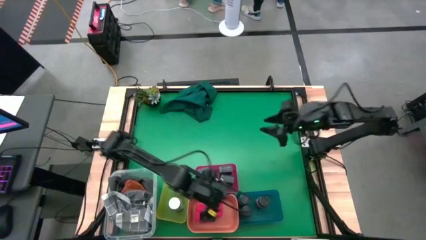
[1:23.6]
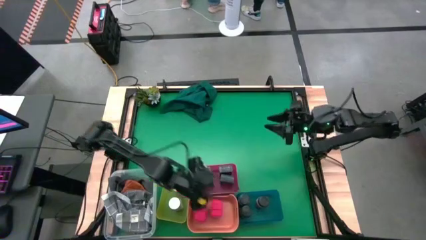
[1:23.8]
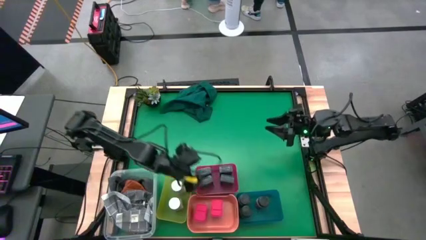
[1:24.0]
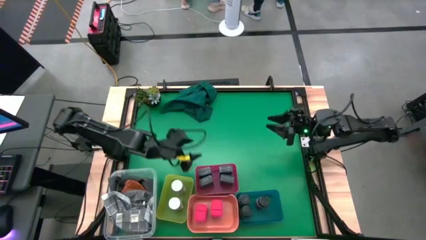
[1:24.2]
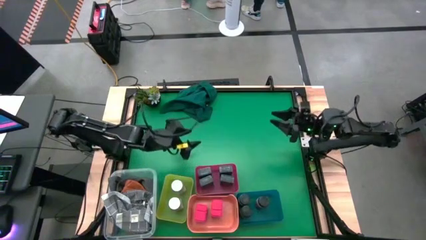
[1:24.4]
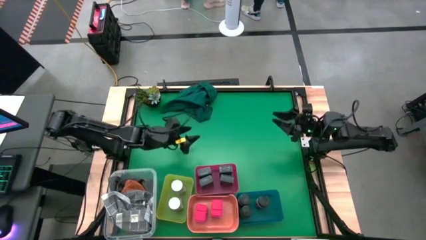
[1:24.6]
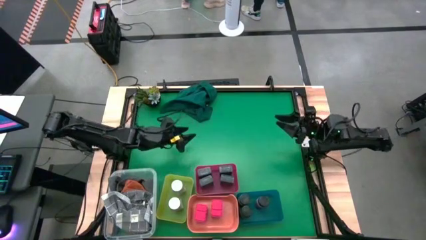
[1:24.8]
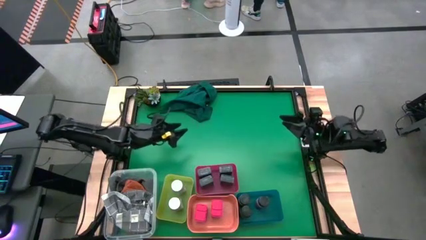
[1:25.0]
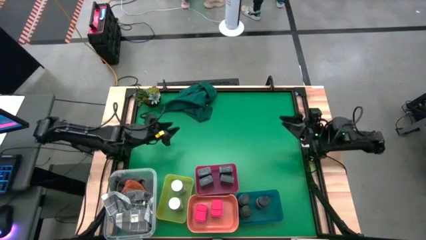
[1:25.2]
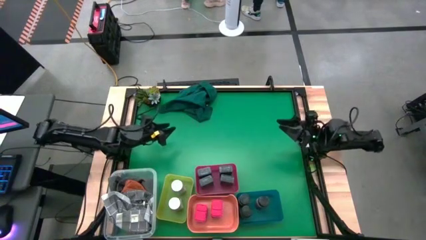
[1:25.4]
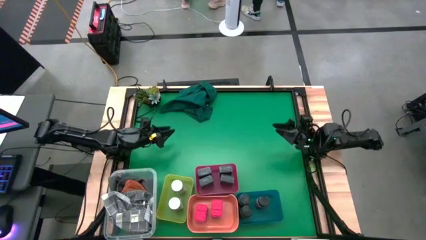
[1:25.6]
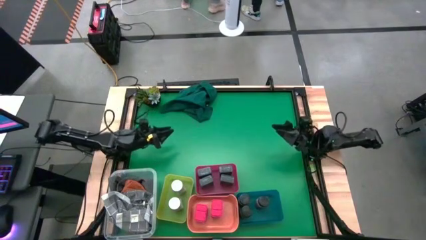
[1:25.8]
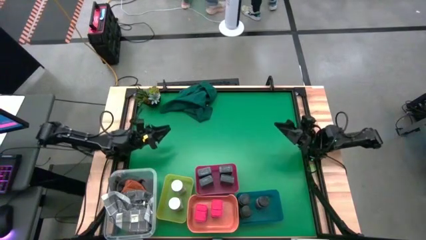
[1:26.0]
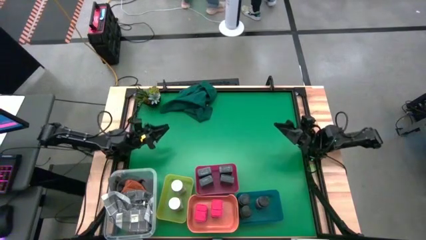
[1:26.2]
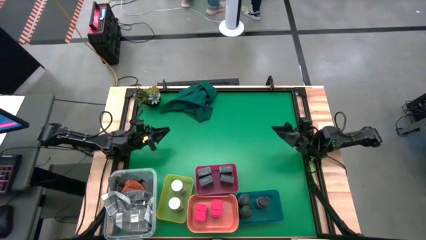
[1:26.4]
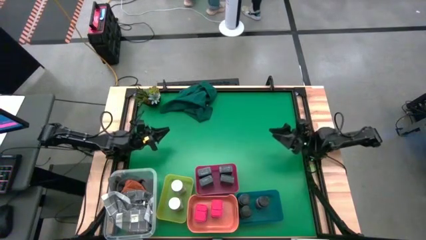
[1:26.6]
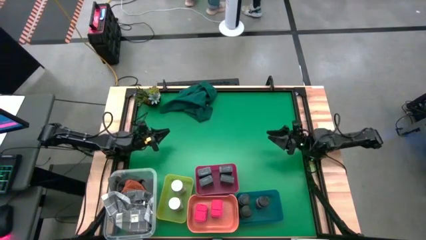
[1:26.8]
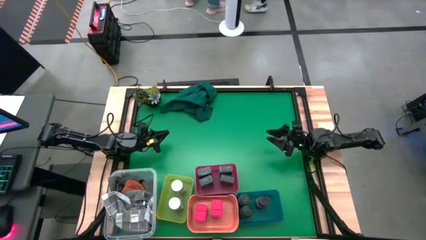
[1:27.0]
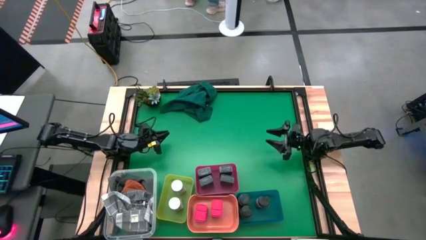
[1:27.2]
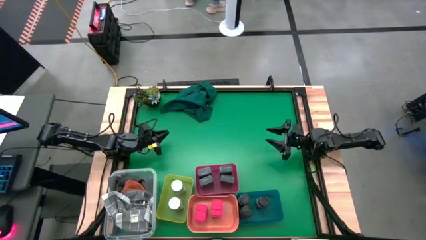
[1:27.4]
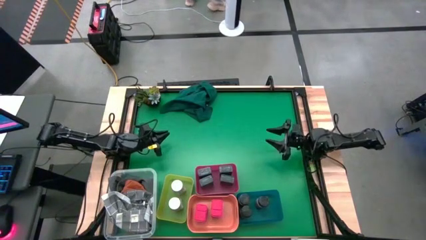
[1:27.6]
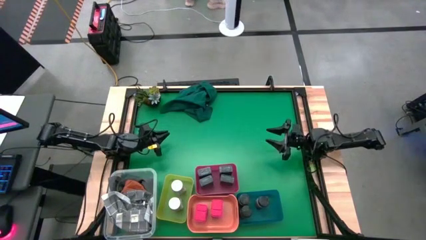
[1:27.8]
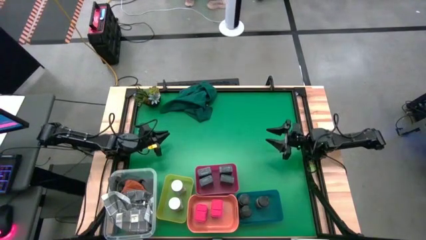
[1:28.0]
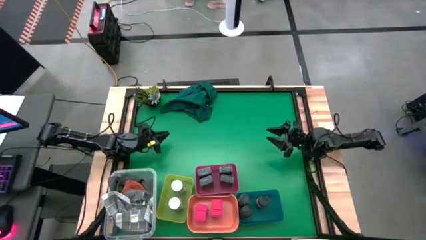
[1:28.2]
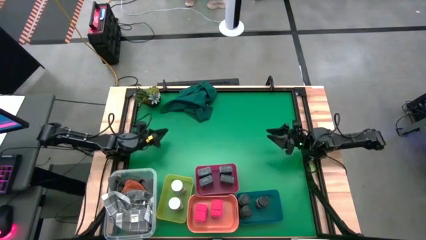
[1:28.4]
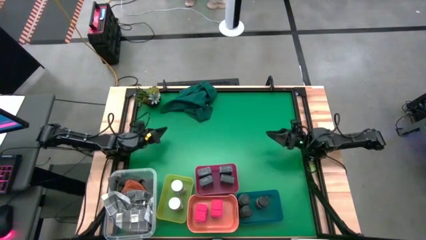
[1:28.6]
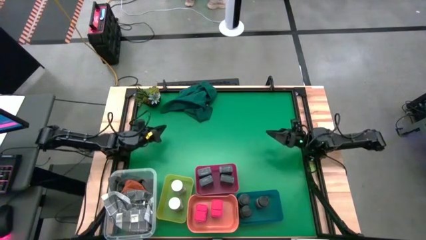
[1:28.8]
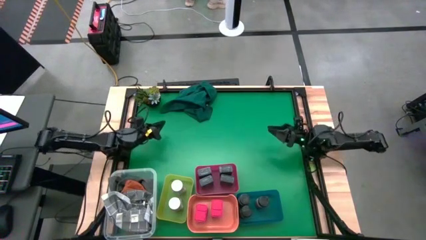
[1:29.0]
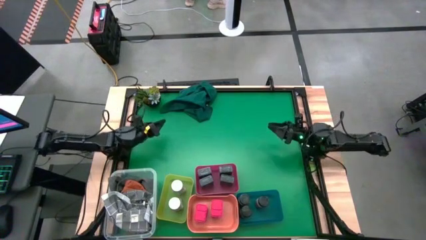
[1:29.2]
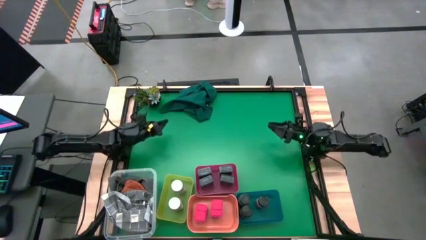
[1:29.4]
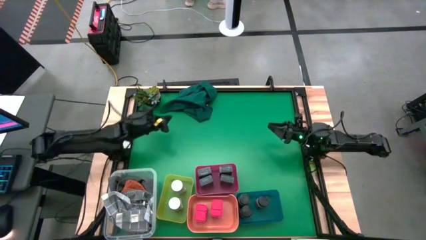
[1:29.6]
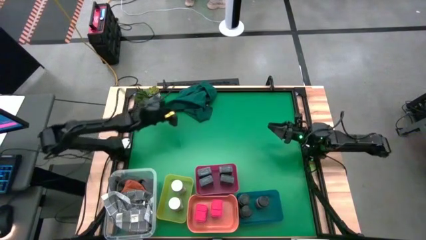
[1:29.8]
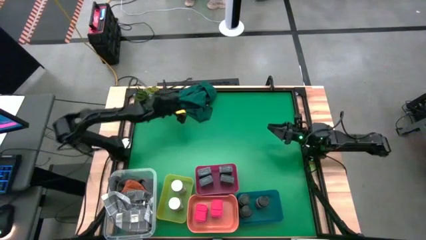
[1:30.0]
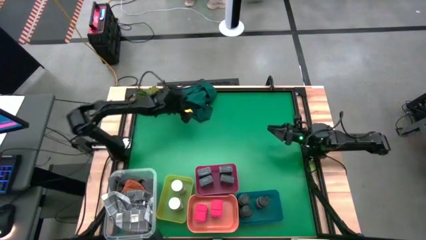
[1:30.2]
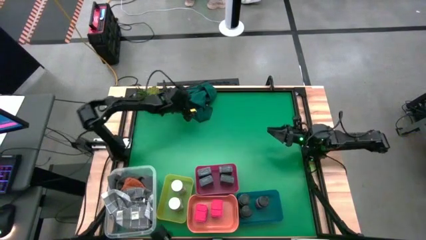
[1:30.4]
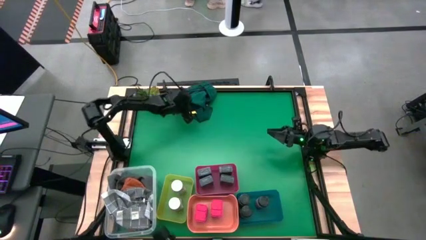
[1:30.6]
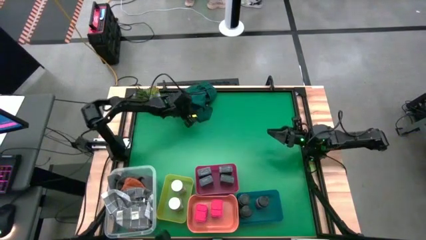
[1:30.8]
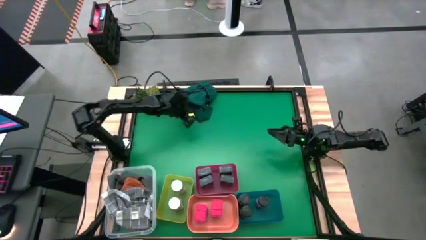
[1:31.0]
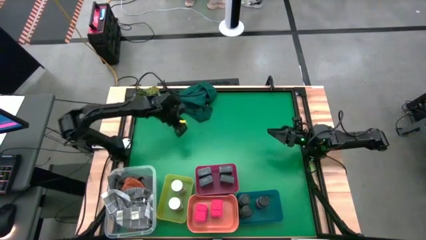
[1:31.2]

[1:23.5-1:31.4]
Task: Sort spices by type
Move the green microfiber cloth to the left of the table

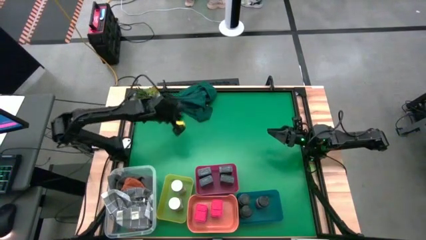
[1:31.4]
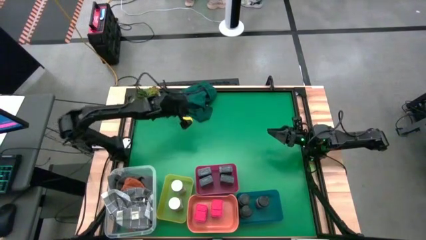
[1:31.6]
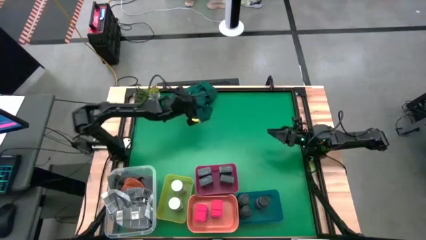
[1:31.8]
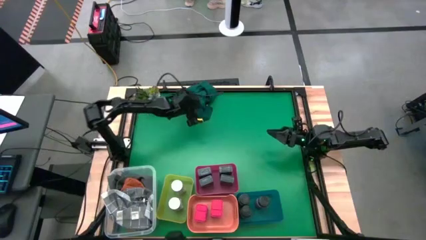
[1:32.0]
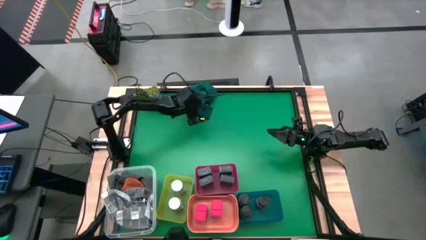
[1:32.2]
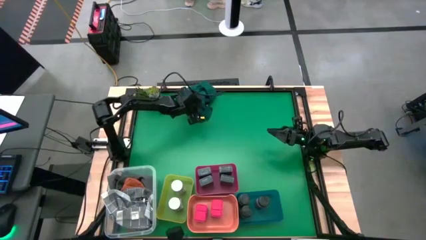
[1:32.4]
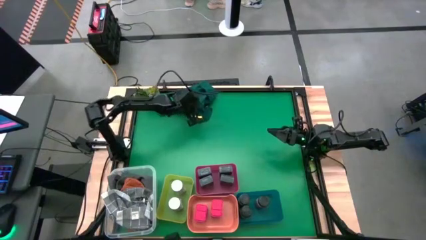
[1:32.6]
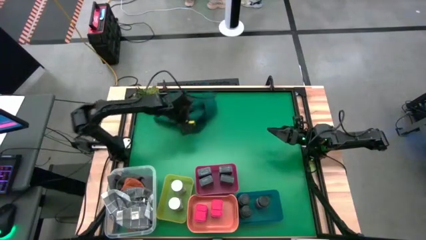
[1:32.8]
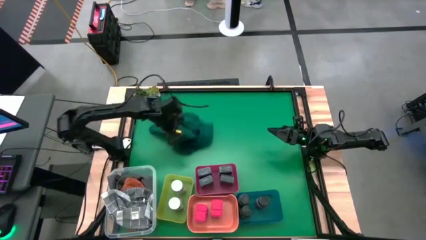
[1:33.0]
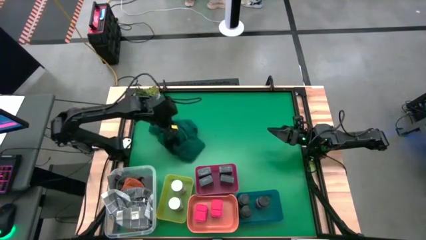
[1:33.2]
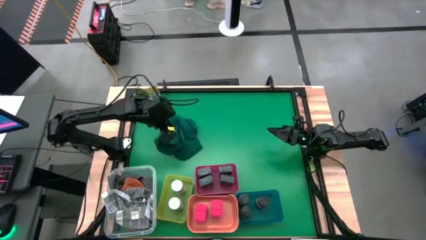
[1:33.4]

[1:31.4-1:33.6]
Move the green microfiber cloth to the left of the table

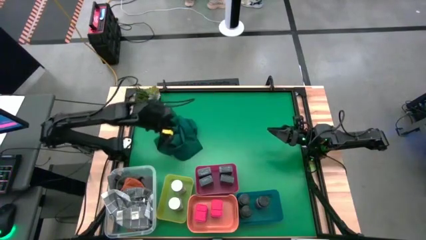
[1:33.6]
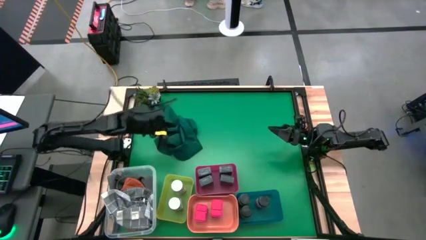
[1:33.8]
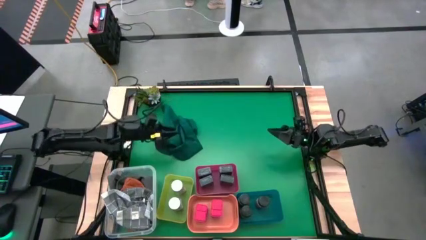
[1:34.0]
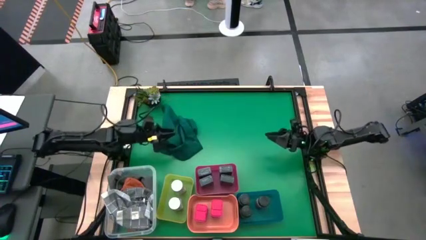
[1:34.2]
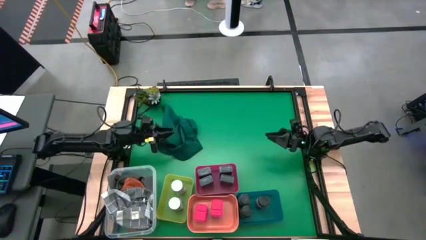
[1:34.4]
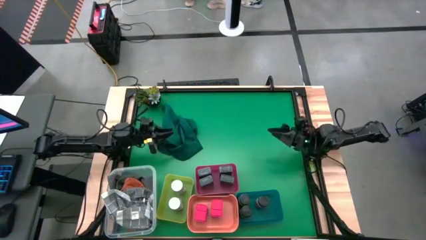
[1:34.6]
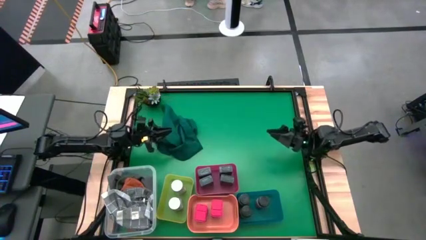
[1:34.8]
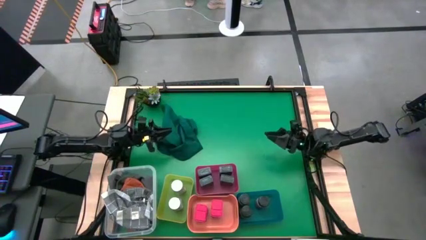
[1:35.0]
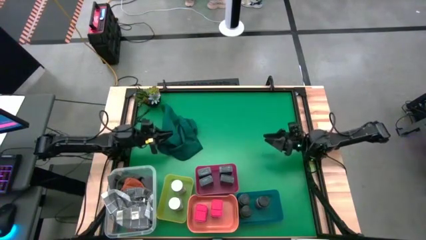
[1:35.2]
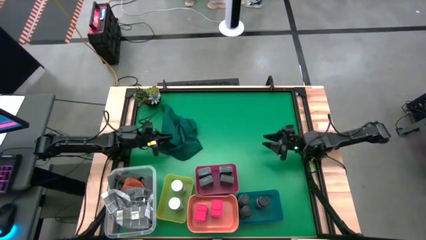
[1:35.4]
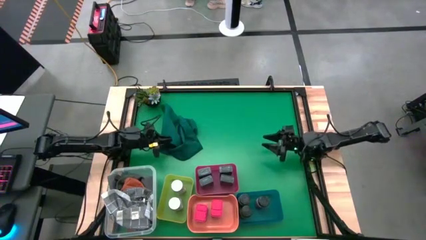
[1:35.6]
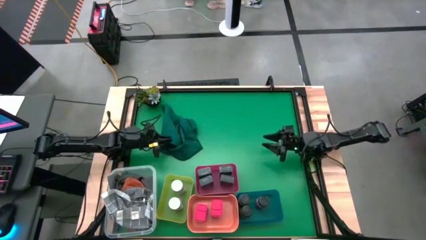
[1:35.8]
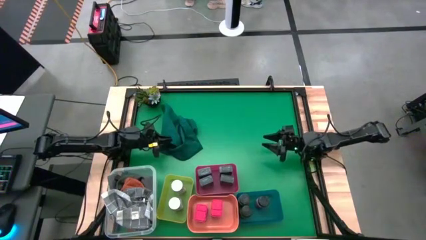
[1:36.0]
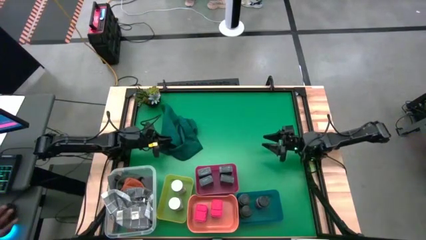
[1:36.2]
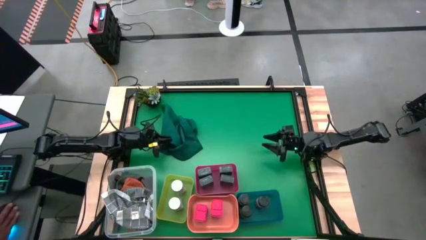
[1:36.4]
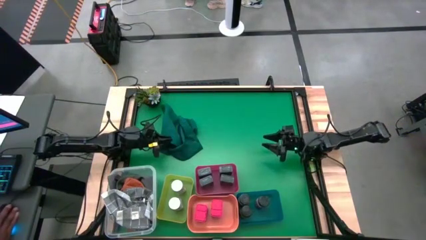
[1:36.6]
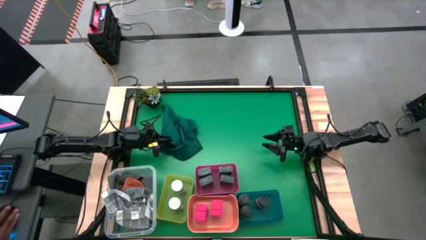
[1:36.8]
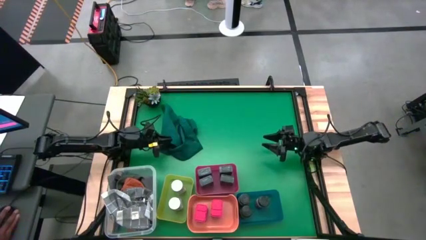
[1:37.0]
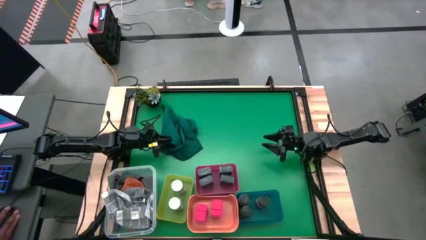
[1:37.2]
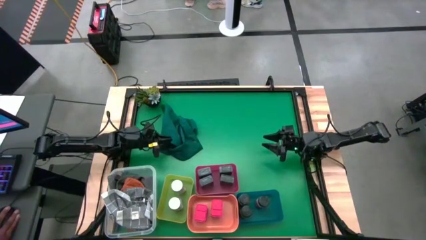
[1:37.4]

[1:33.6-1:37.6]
Return to Home Position
